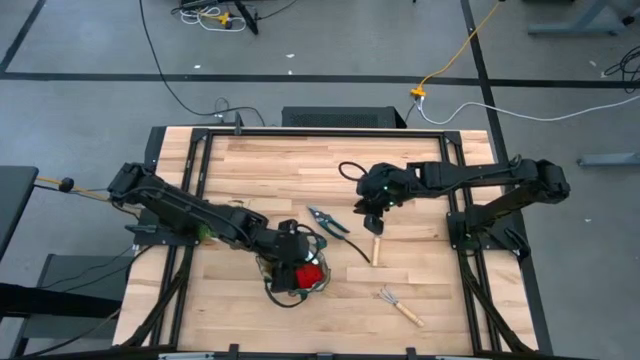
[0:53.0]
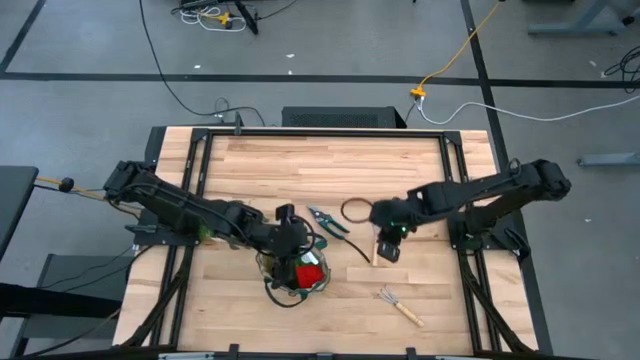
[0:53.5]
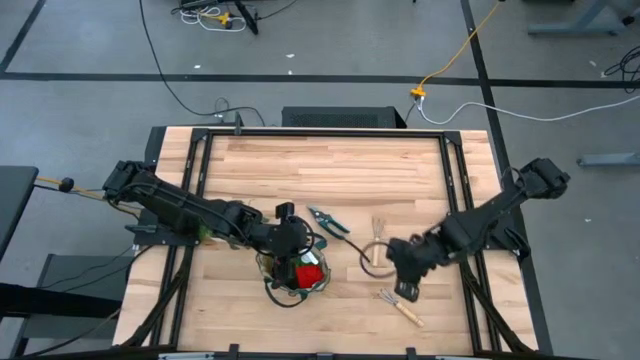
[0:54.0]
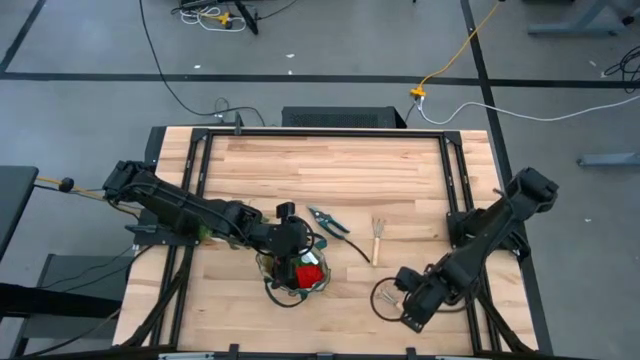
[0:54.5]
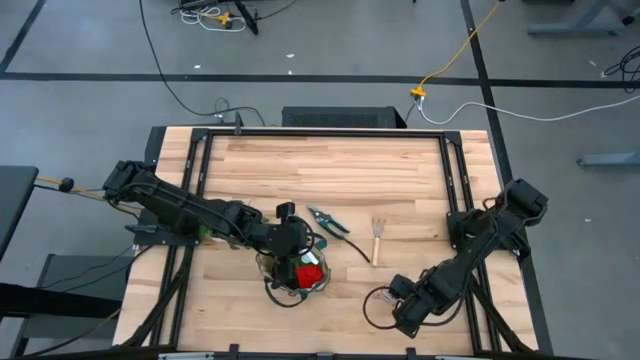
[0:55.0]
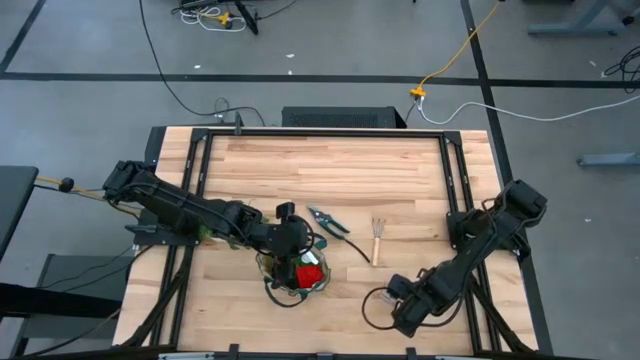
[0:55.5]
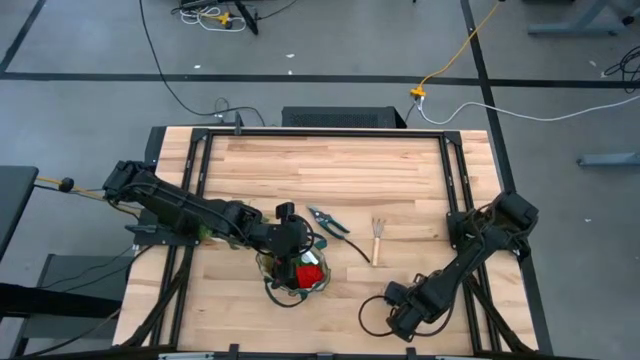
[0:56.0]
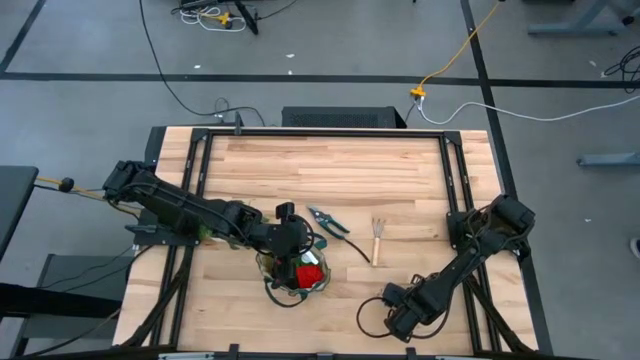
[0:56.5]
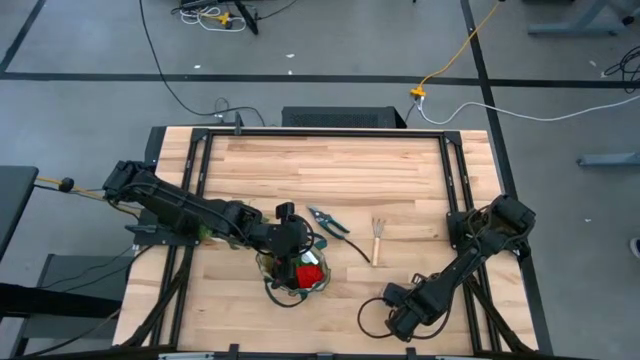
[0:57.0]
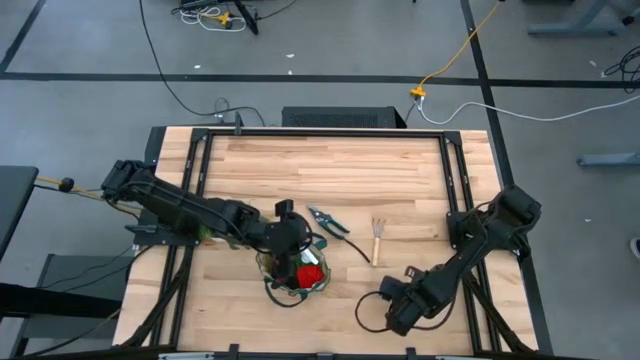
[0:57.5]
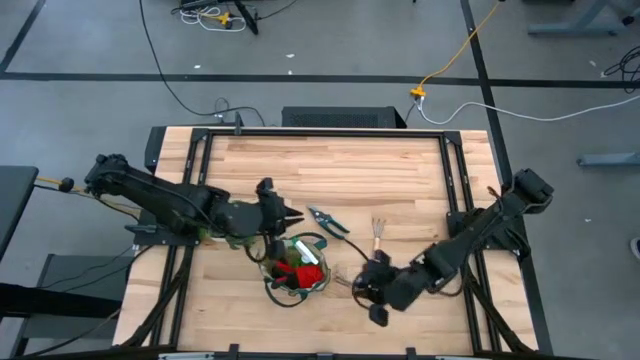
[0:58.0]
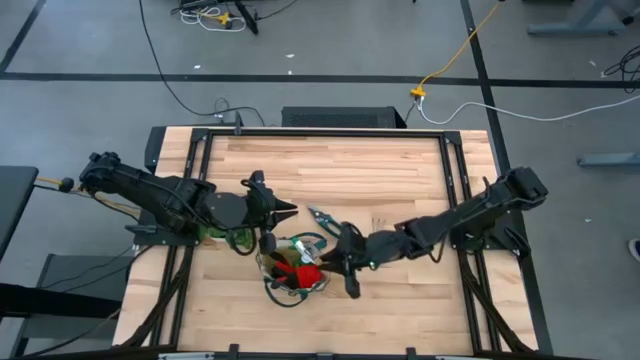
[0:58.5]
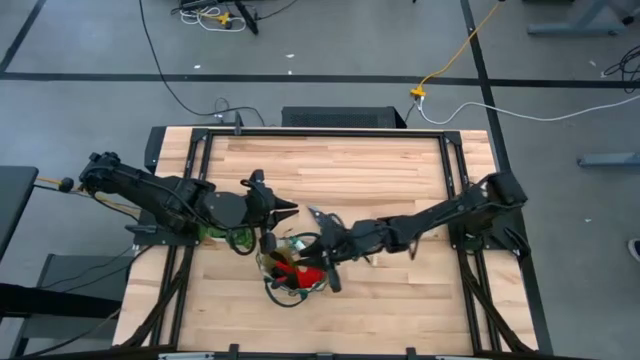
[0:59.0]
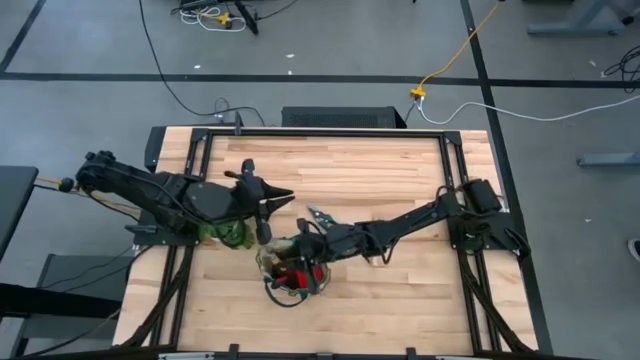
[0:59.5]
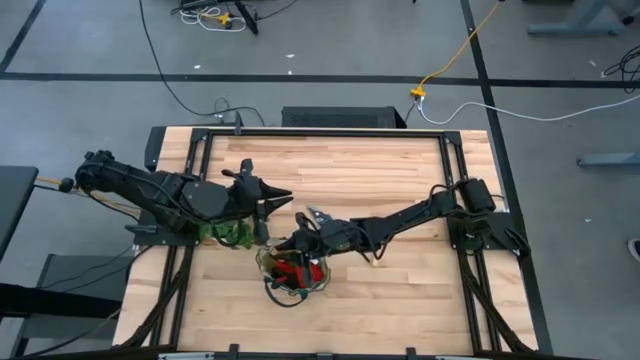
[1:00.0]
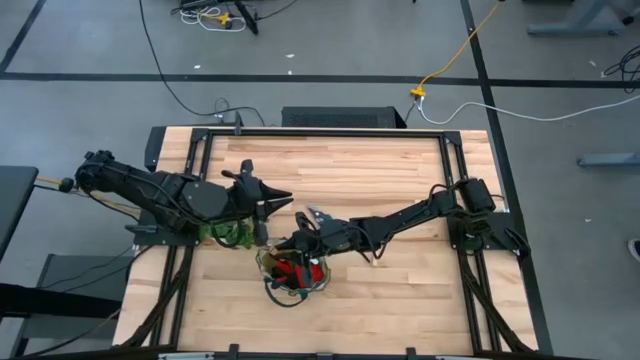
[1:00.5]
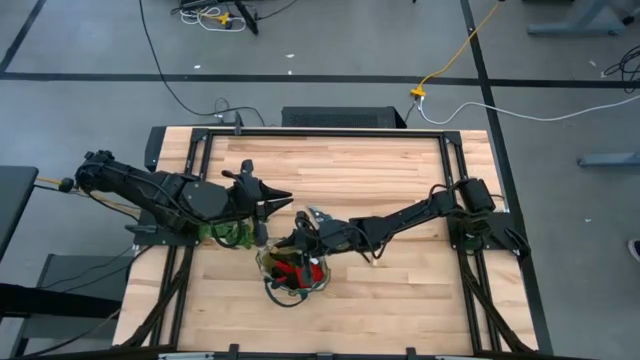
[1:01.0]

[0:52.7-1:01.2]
Task: Pick & Place Garden tools in Gardening bag
Put the bottom hand rake into the gardening bag

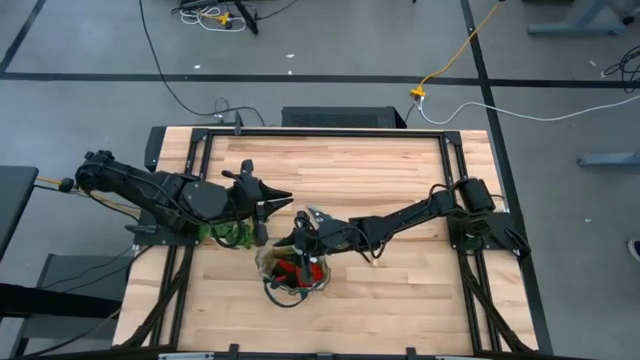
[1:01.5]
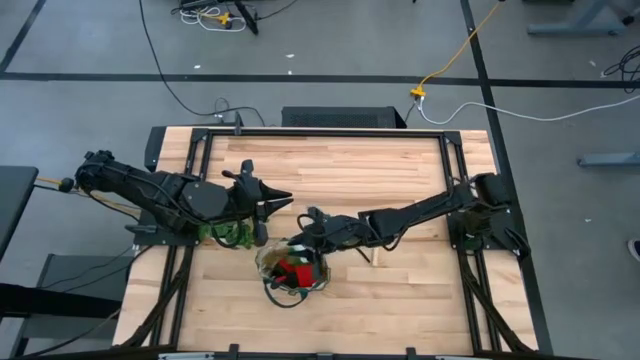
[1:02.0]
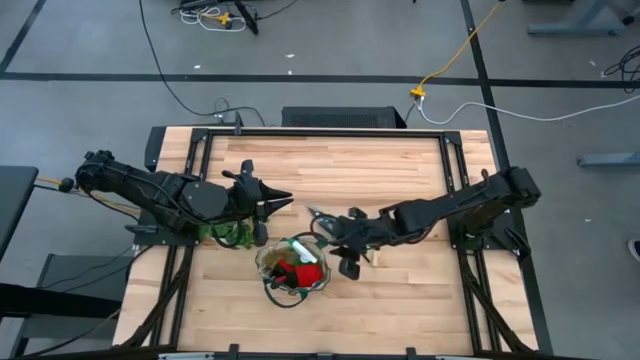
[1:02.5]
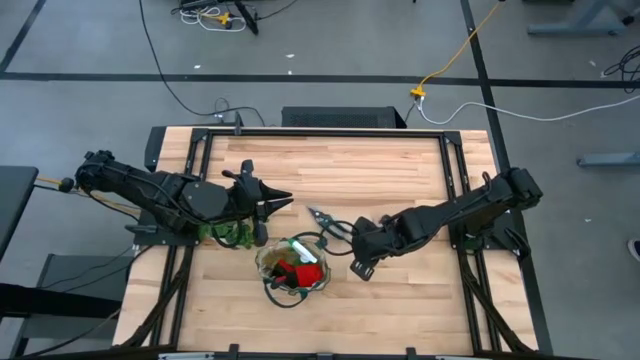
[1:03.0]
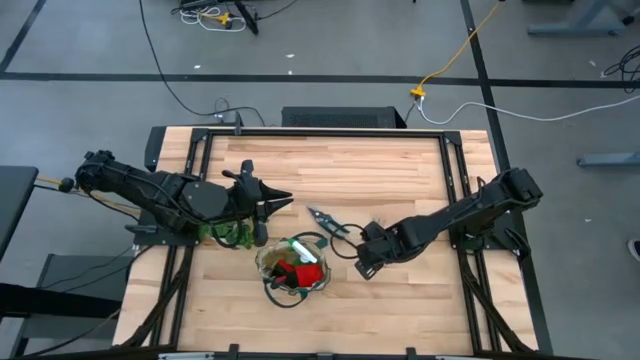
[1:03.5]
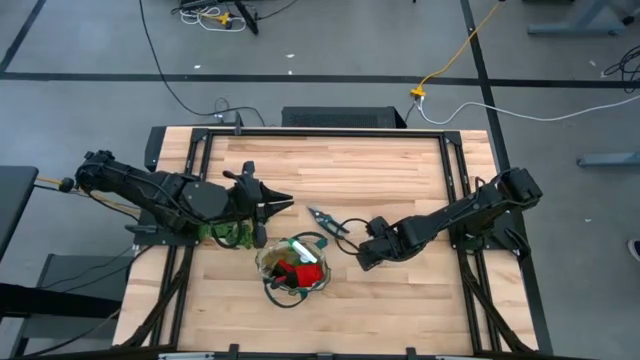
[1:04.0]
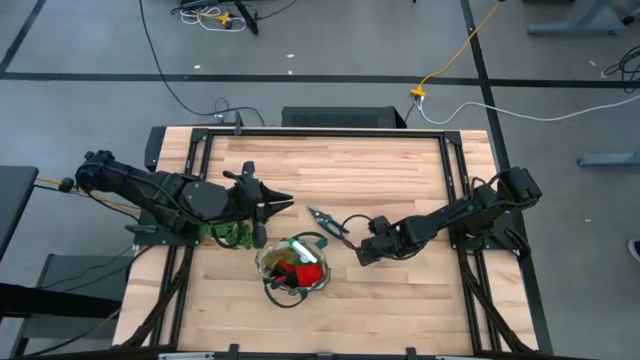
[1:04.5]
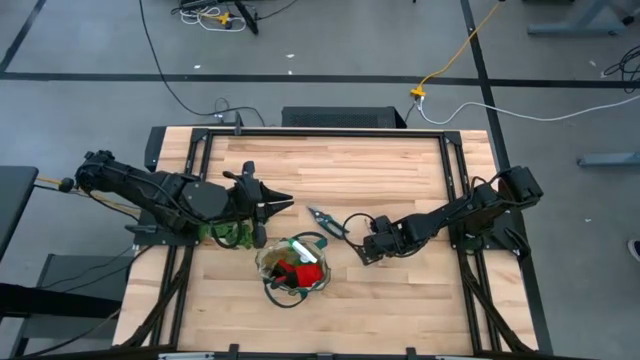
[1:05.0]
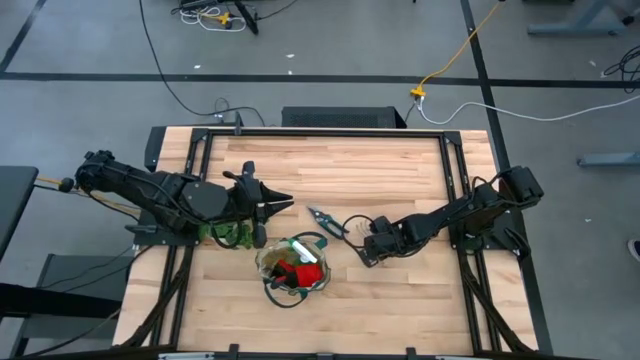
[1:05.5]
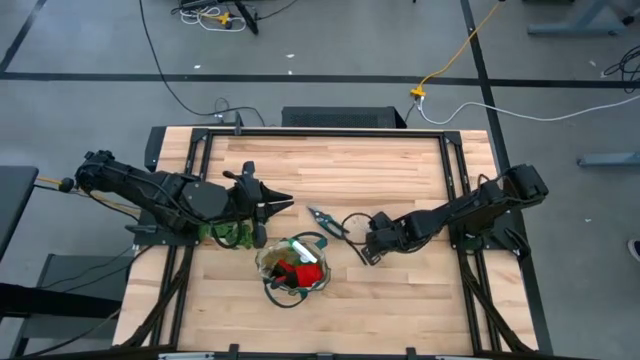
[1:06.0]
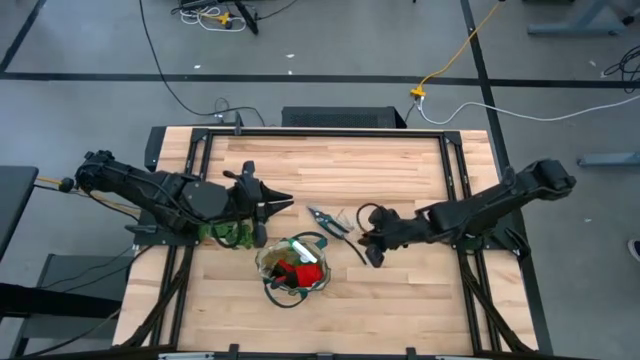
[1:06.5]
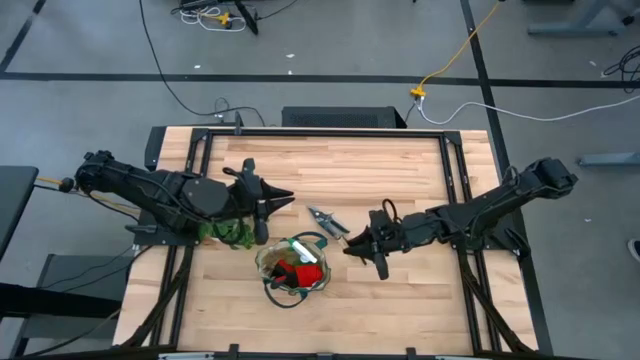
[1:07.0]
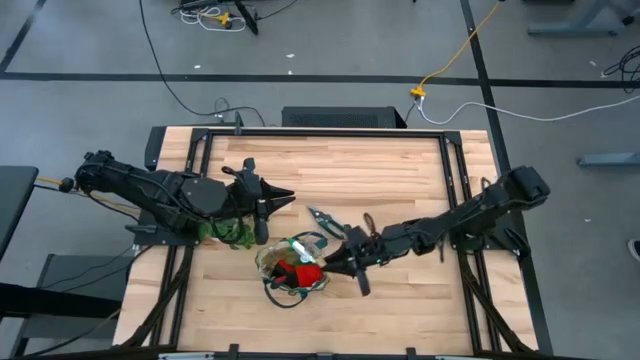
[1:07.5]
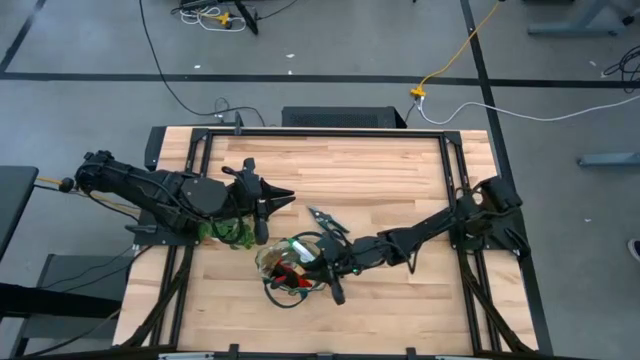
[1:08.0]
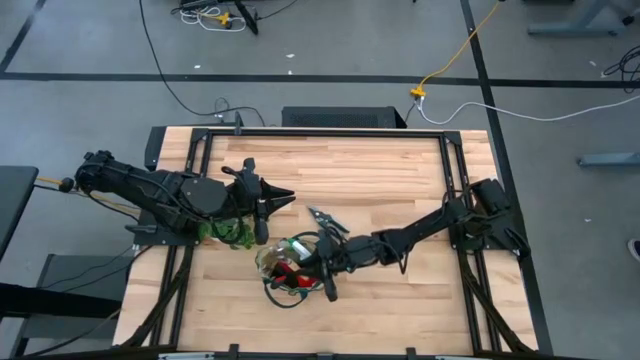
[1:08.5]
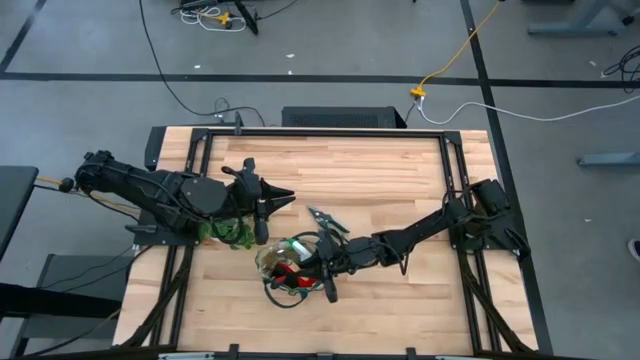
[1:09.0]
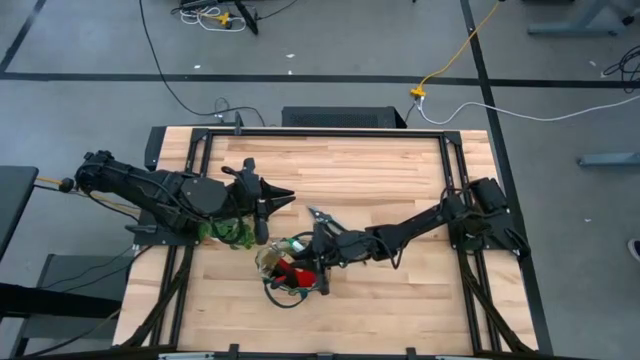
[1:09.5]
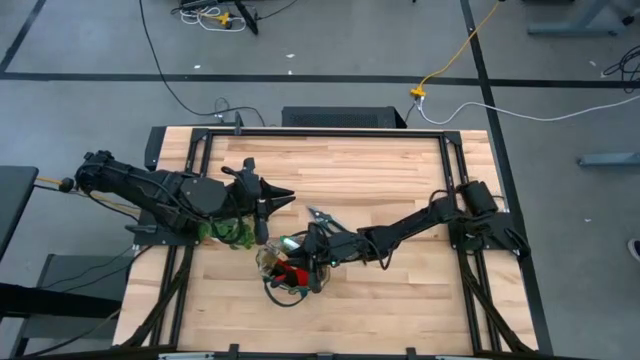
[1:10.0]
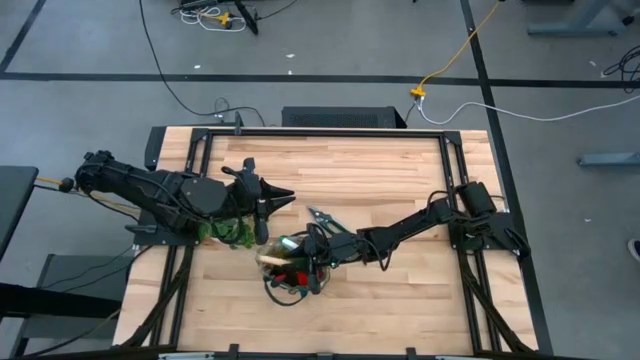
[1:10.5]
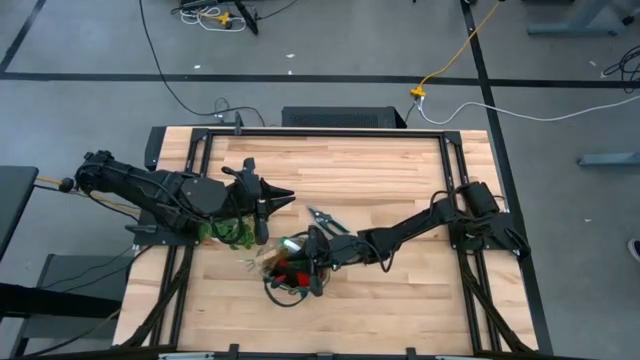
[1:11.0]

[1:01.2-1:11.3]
Put the hand rake into the gardening bag

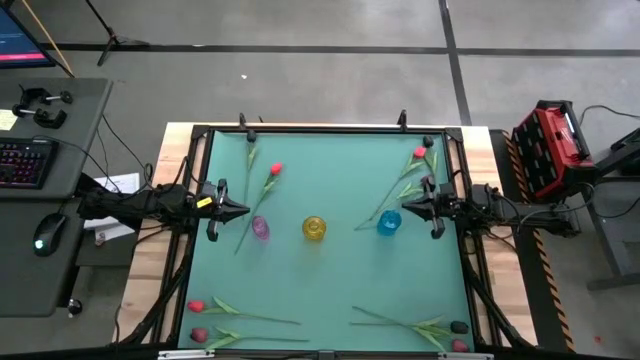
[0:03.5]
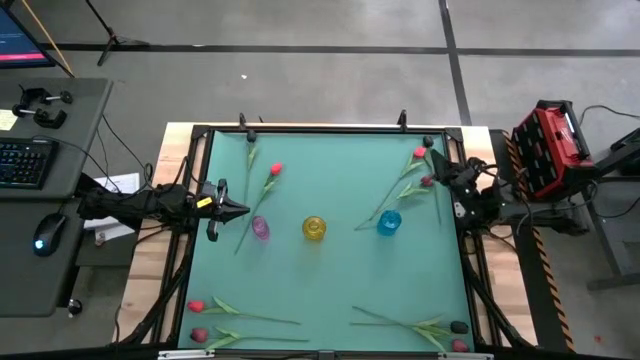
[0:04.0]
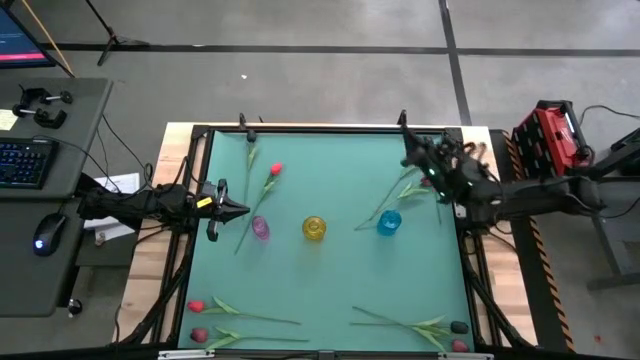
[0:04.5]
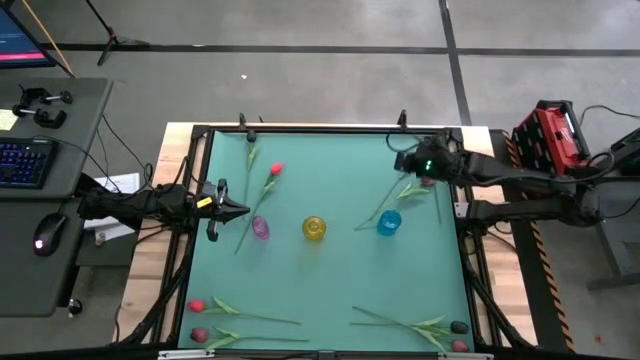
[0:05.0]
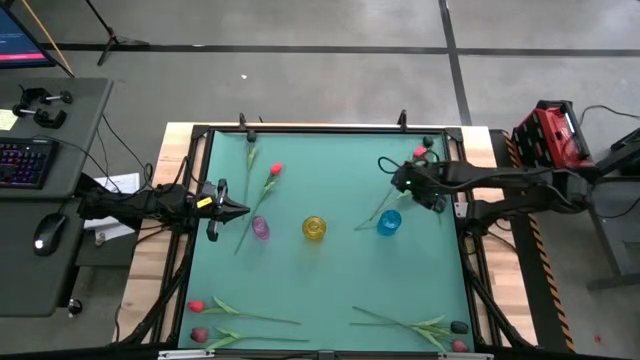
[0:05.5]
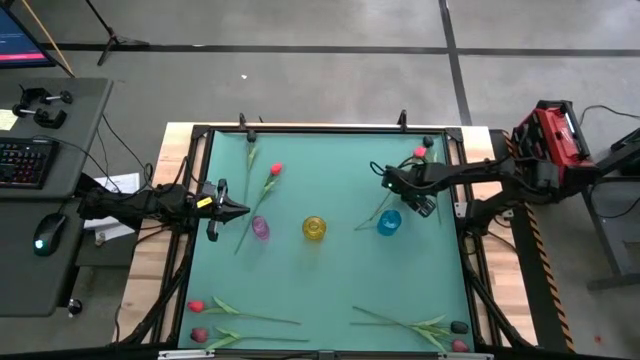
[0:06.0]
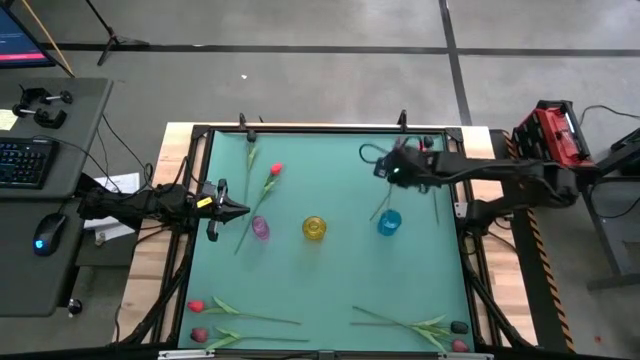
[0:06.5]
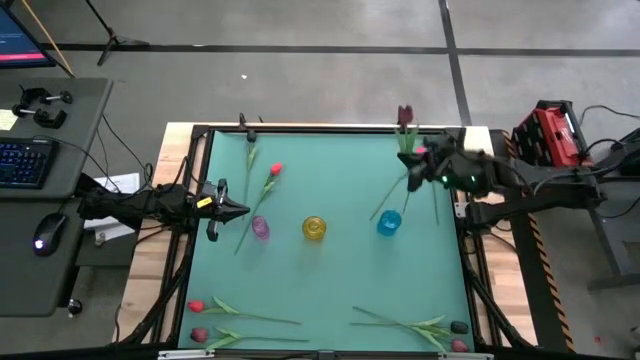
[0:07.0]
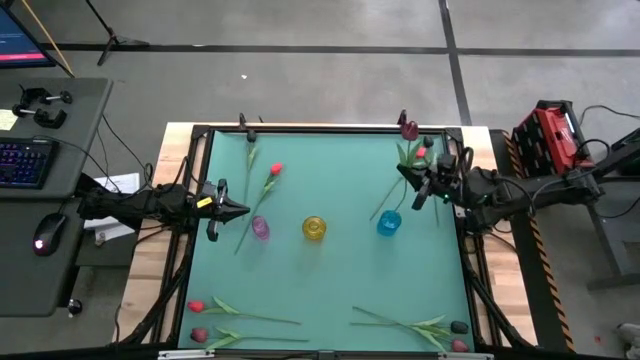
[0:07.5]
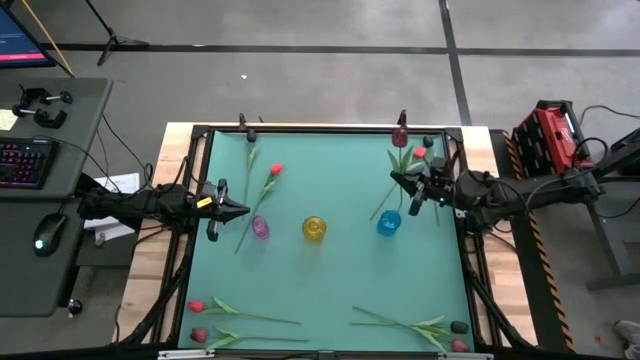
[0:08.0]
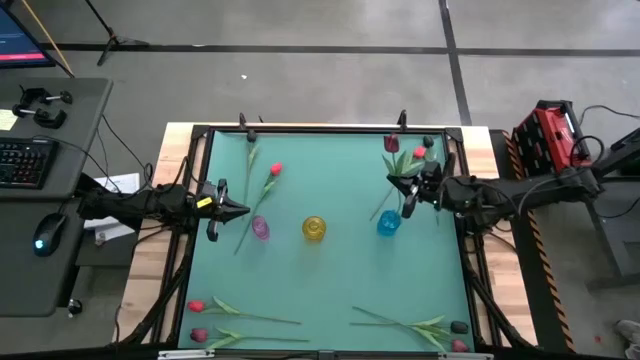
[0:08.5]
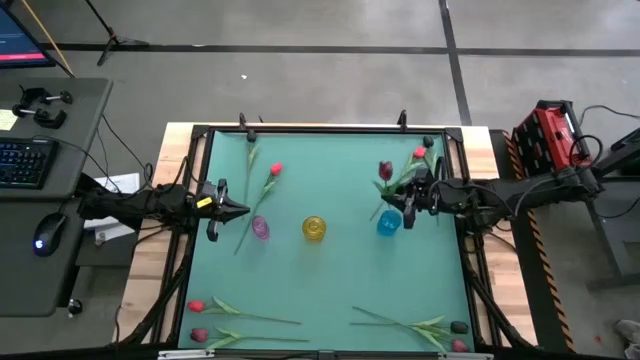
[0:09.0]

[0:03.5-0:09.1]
Task: Sort flowers into vase by color
Put the top dark red flower into the blue vase
